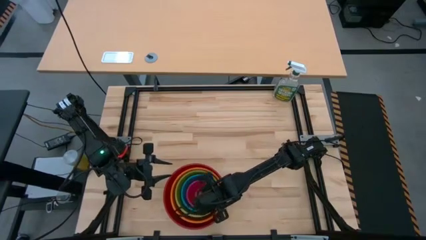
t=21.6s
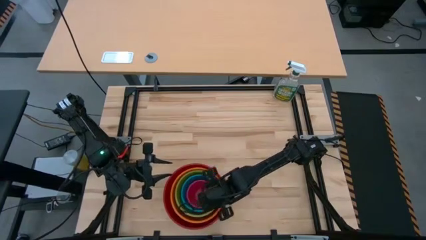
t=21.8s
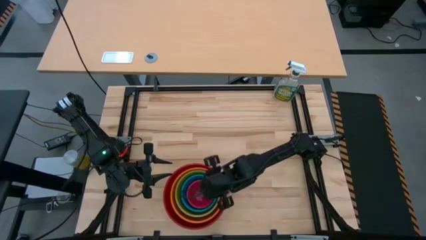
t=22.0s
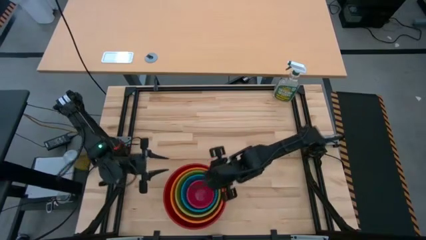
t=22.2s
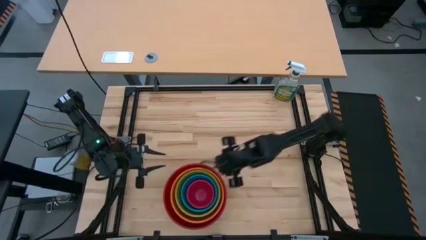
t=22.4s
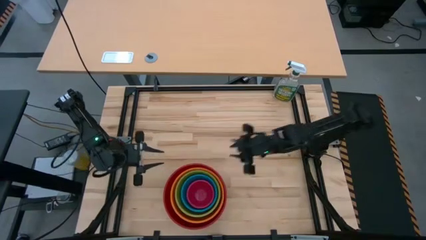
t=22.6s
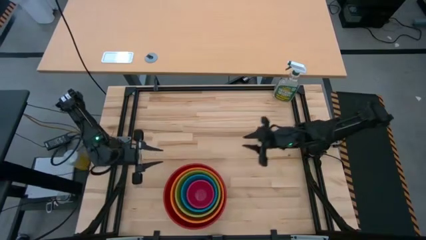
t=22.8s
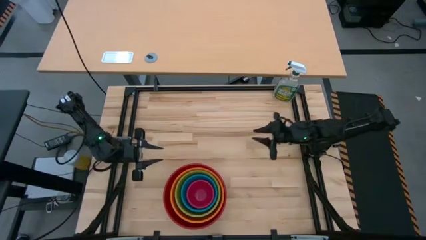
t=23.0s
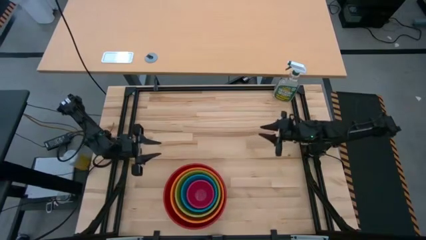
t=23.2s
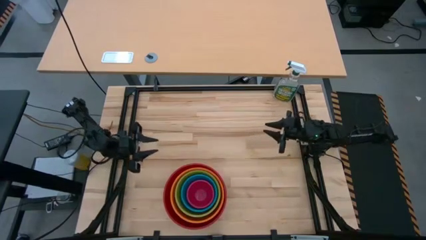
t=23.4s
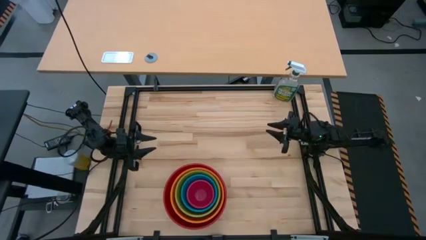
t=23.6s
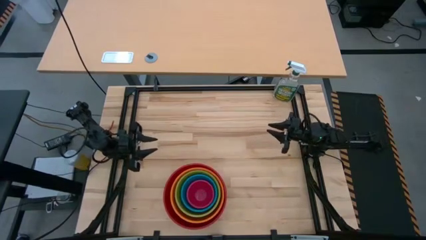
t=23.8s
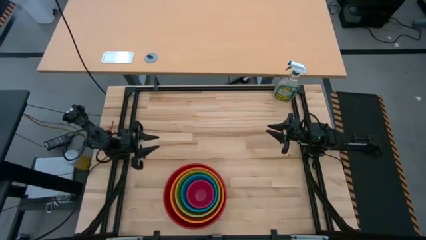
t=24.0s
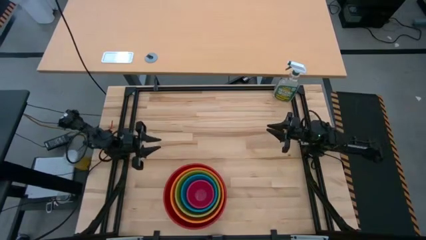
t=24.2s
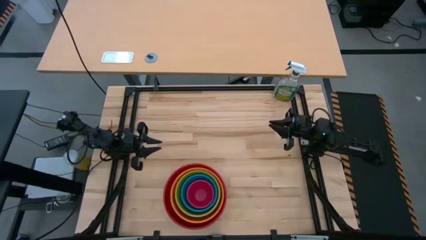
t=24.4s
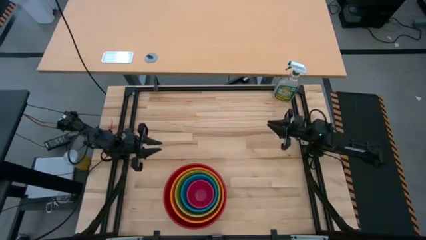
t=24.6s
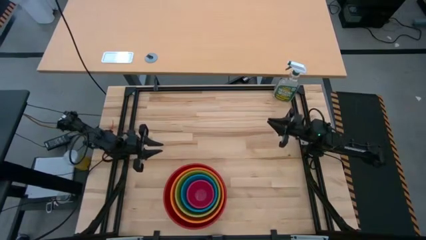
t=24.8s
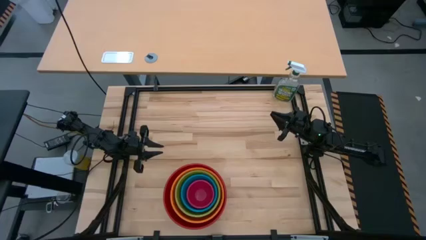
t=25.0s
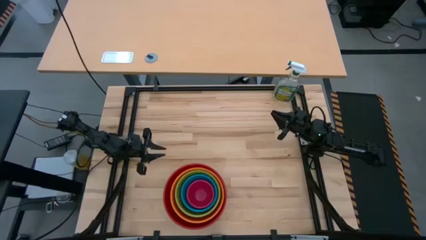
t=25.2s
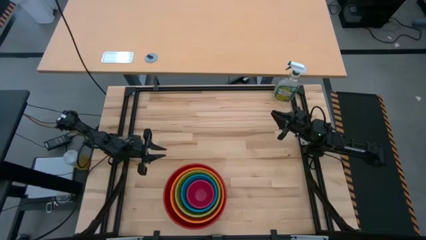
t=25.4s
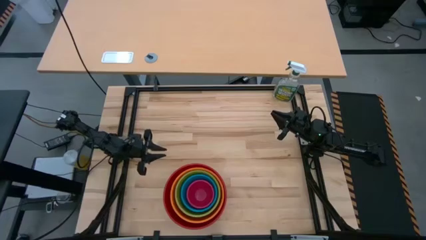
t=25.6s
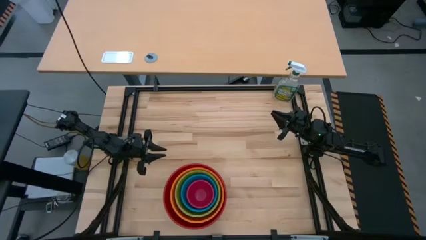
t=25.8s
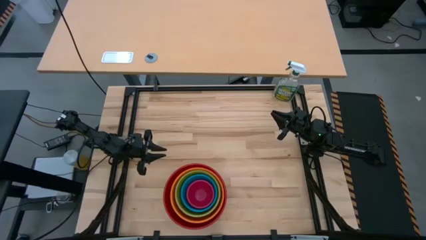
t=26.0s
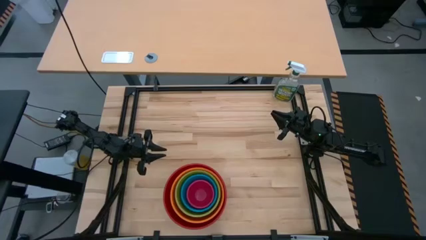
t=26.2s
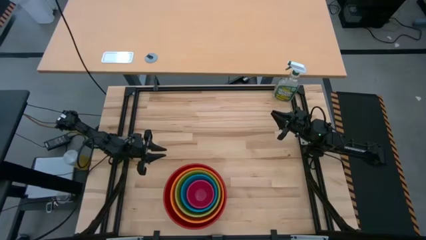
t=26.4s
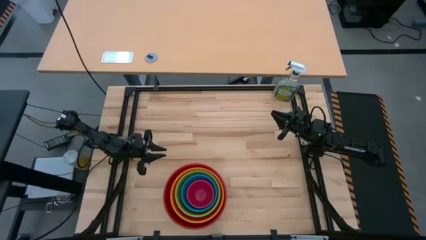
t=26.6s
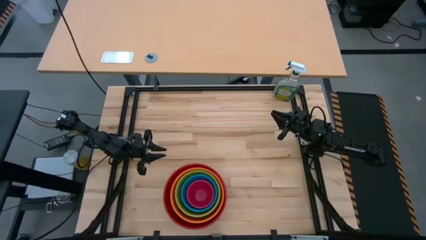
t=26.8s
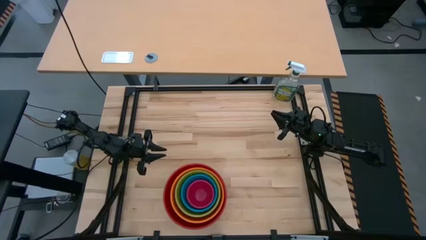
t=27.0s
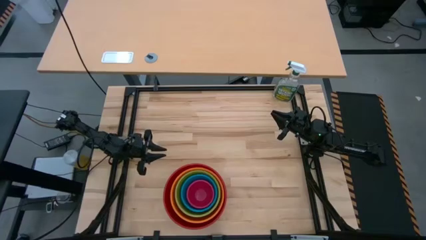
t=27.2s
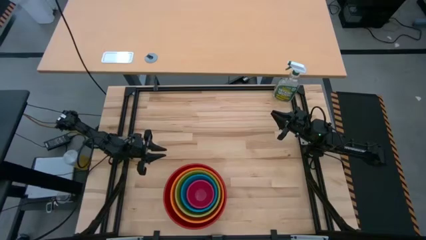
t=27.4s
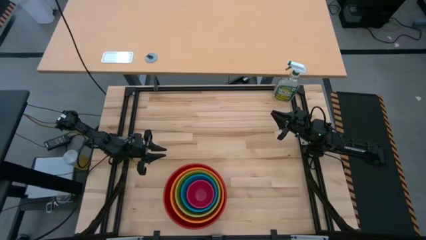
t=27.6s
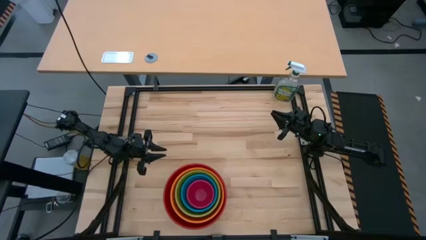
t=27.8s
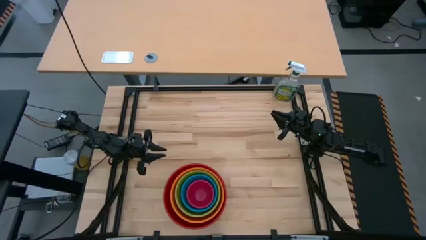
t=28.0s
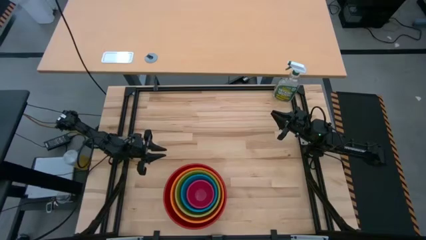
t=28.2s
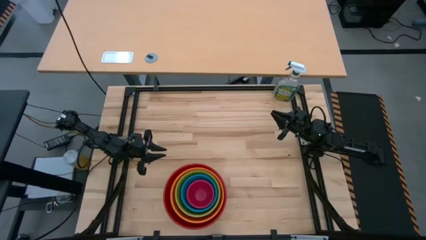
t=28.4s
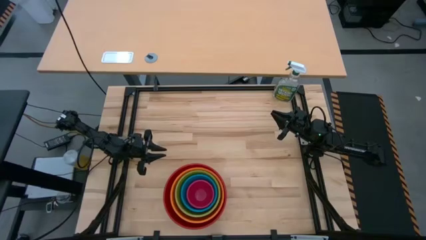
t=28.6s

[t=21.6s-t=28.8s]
Return to Home Position
